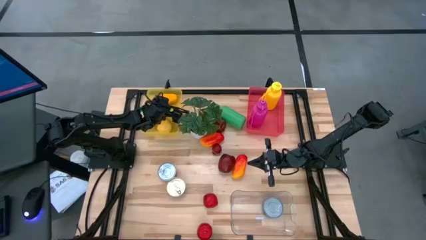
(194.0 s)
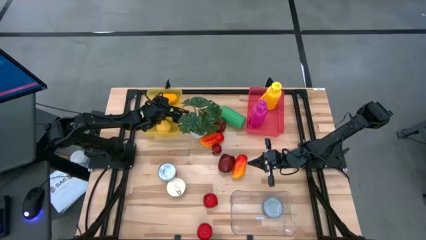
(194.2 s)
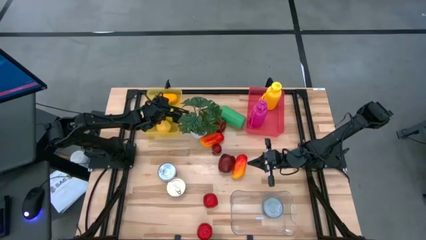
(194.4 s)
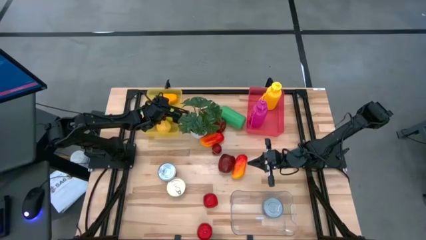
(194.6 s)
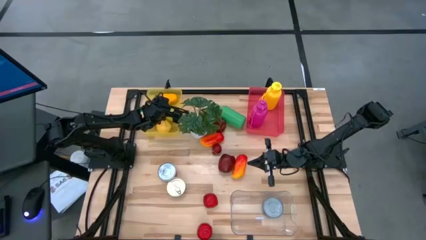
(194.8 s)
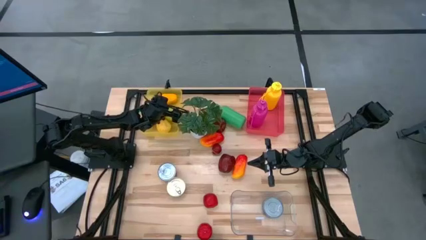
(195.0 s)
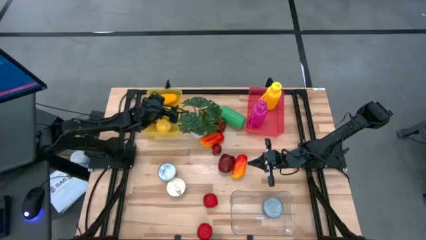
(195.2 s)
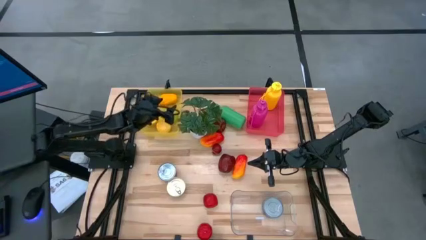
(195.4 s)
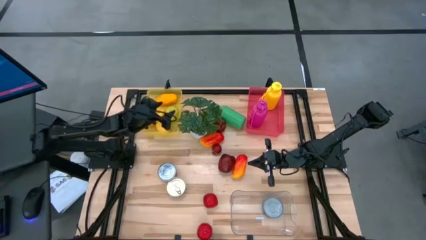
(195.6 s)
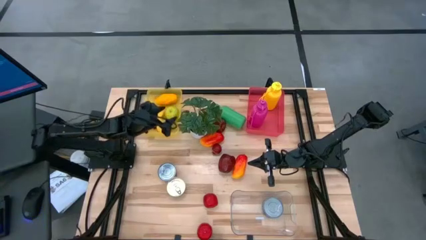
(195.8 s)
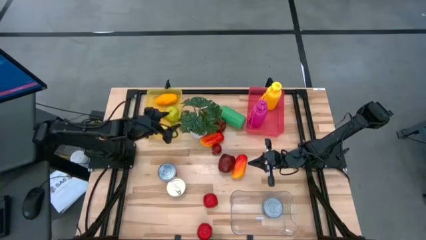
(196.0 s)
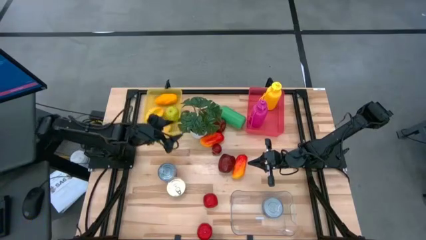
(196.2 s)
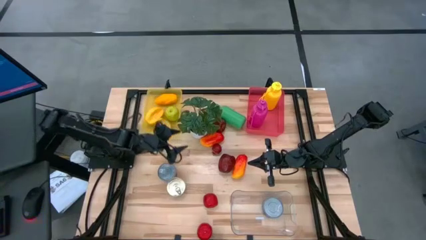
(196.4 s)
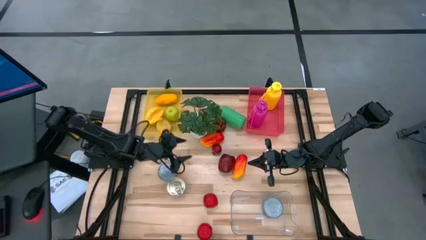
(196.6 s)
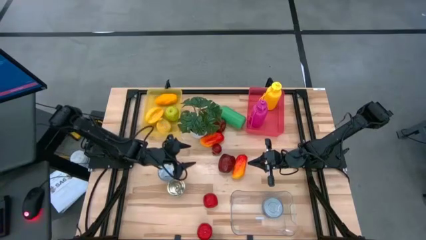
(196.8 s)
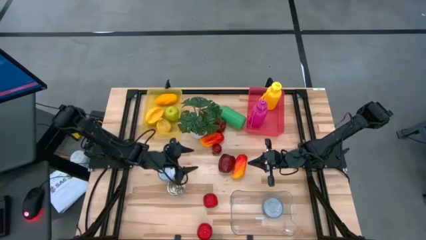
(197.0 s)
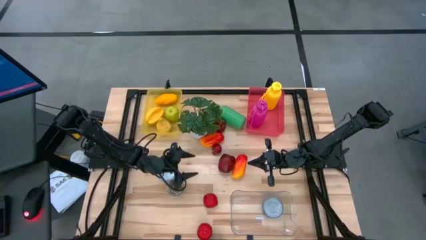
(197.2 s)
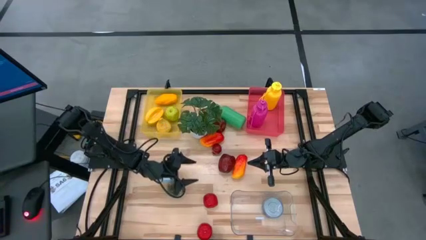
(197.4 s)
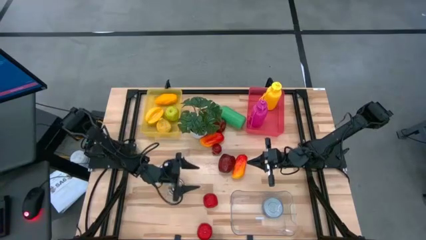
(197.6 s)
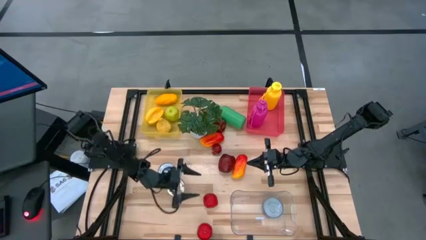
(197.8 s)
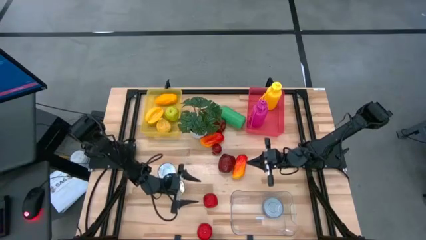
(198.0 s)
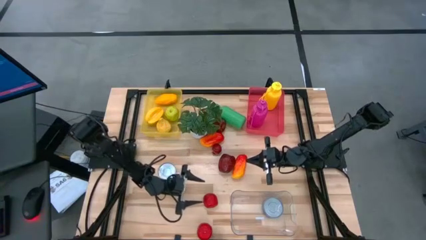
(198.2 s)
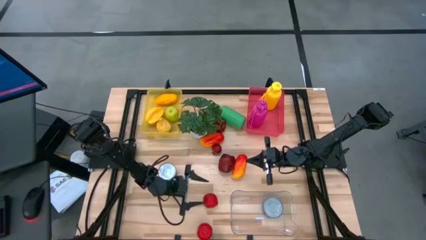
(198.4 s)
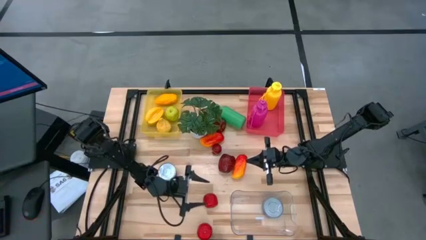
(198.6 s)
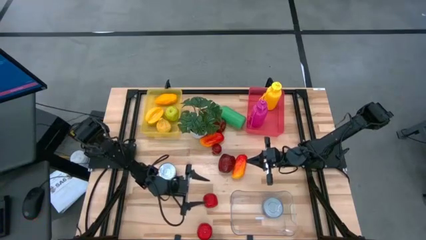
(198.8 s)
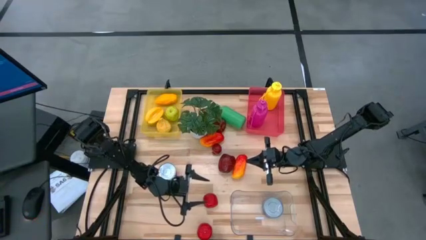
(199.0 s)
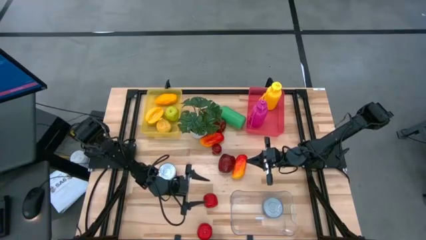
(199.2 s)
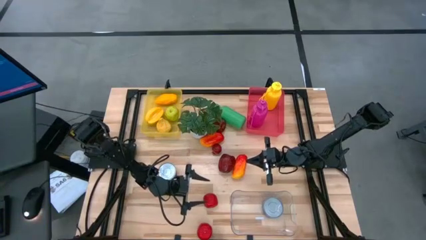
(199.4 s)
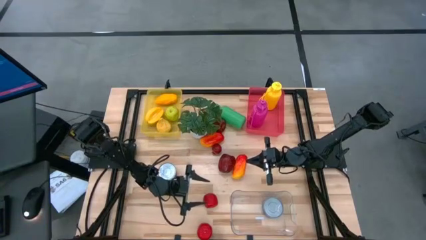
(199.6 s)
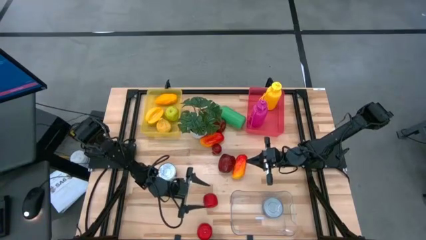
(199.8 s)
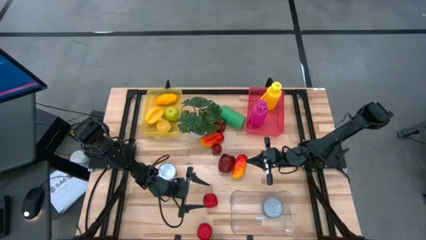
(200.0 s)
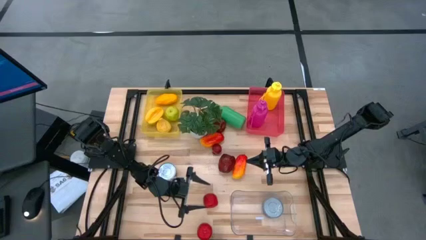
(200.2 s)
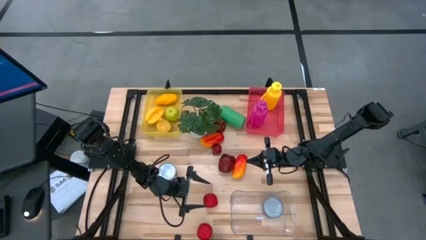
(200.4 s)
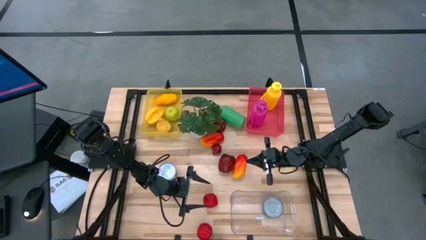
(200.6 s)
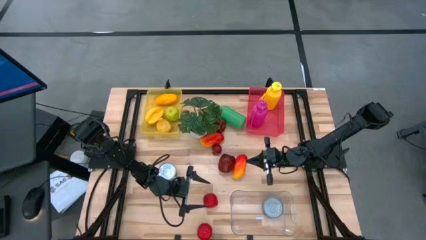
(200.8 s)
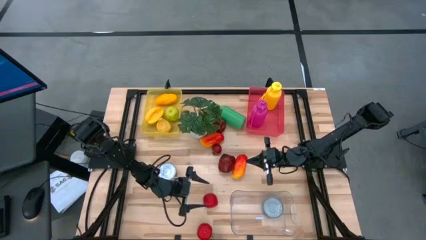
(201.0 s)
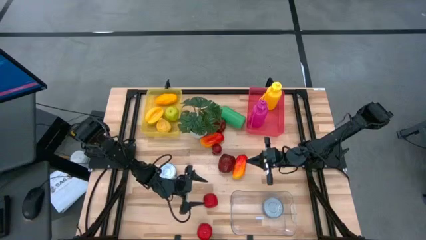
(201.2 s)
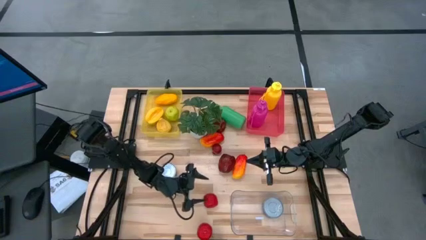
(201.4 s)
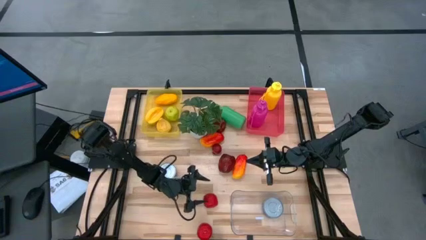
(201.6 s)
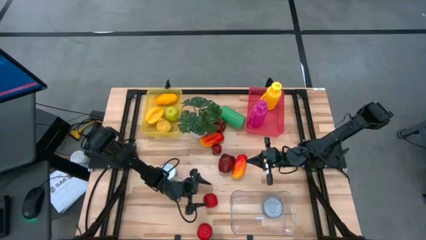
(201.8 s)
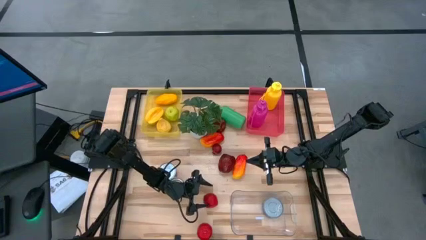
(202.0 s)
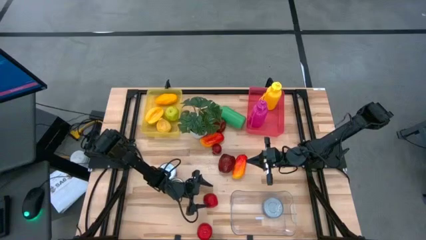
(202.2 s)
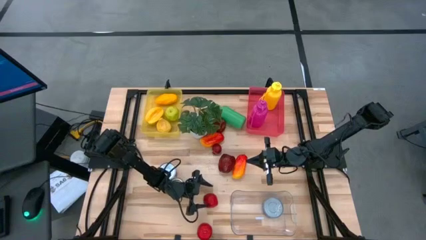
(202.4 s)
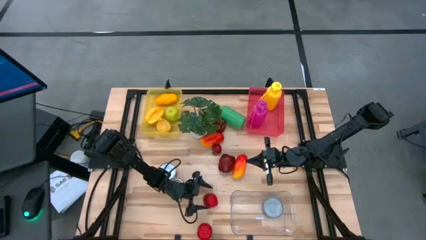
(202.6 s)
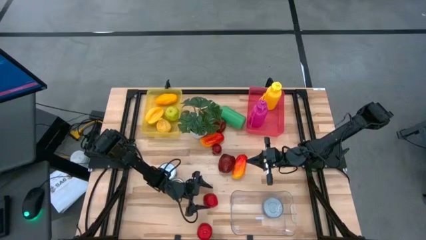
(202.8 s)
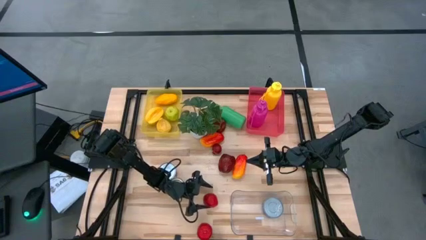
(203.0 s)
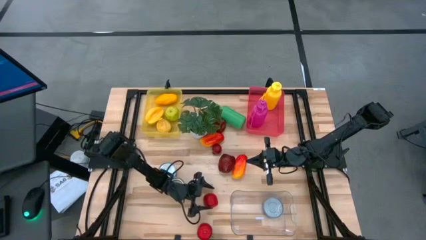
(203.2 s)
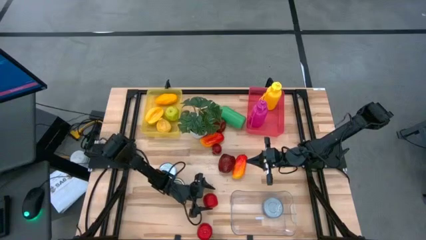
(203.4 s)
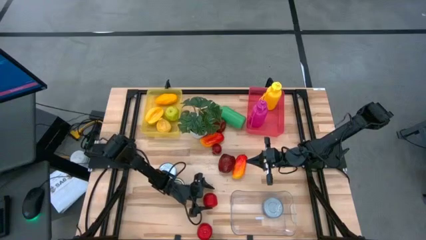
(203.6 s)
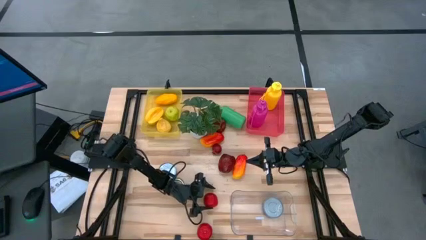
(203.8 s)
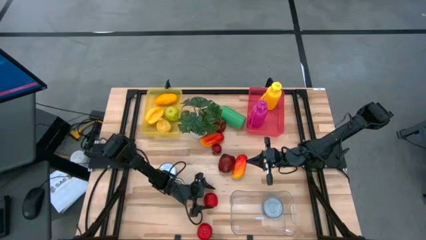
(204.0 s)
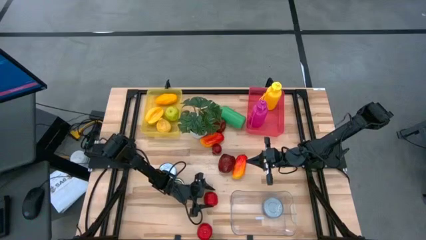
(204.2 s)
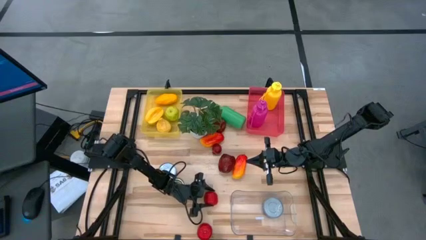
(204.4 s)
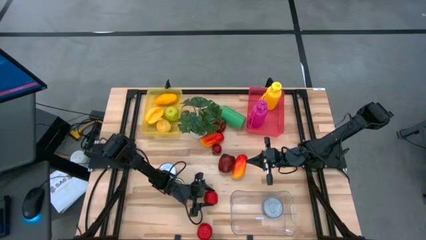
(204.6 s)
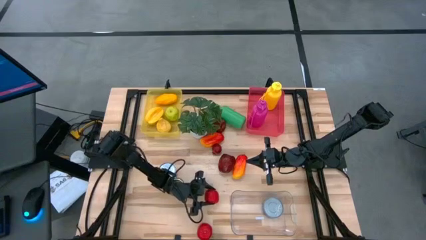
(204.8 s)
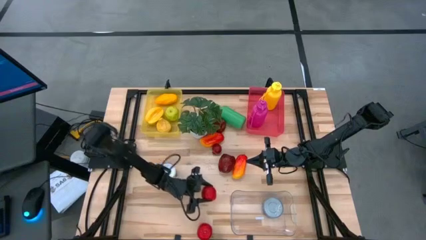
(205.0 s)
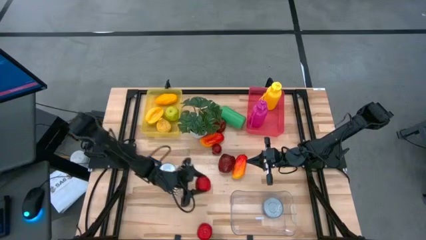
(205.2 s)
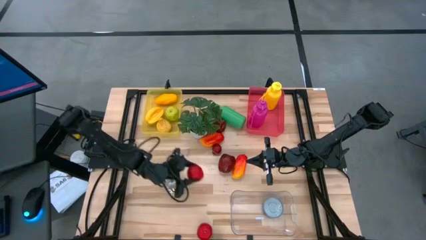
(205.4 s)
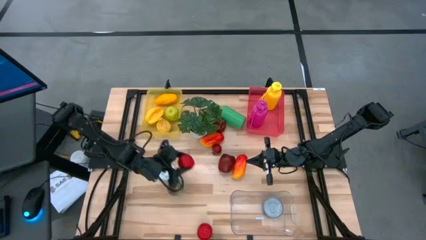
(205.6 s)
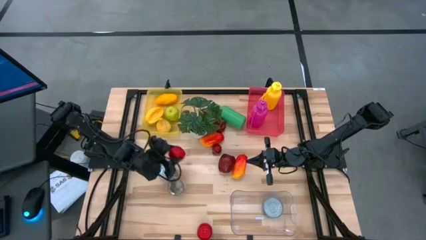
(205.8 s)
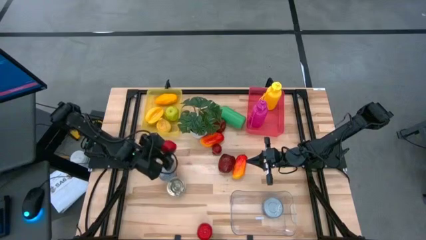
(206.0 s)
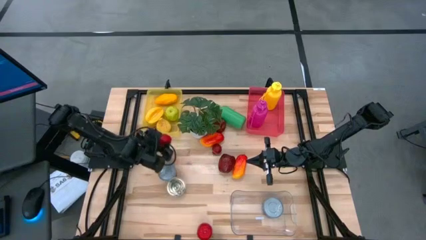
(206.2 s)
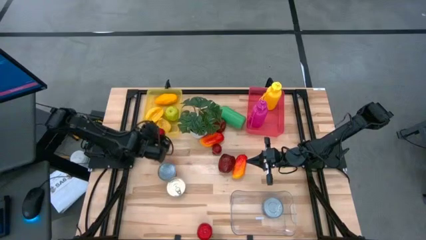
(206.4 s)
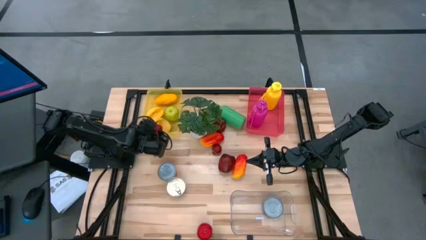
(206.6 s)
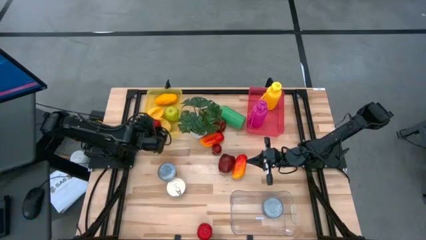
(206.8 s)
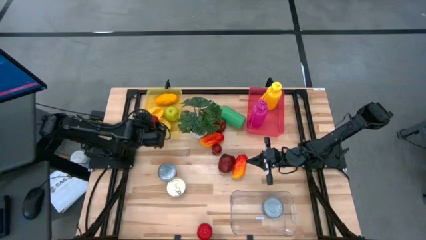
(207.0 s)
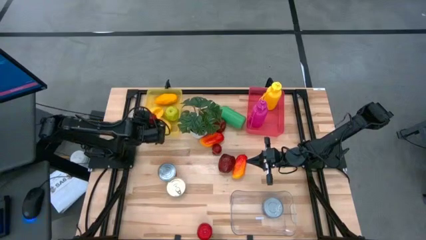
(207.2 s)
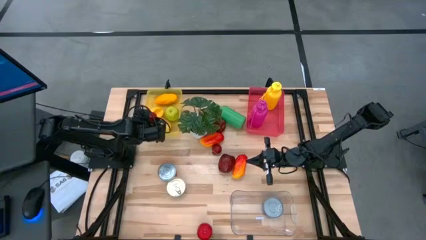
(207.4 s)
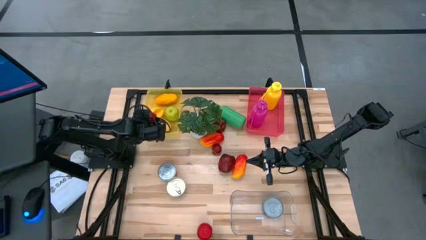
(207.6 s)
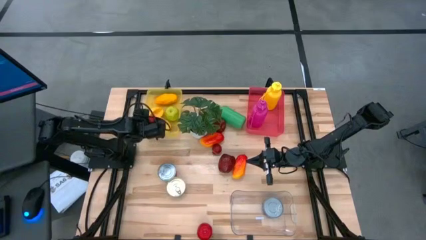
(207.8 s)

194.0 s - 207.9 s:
Task: Pick & Place Food Item
Put the red apple into the yellow bin
